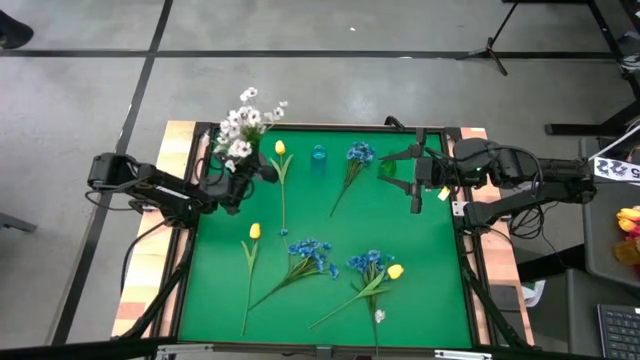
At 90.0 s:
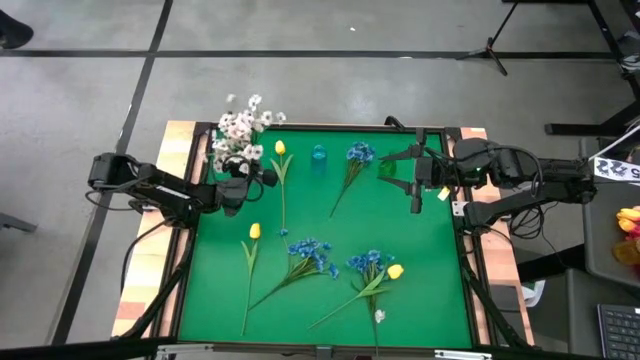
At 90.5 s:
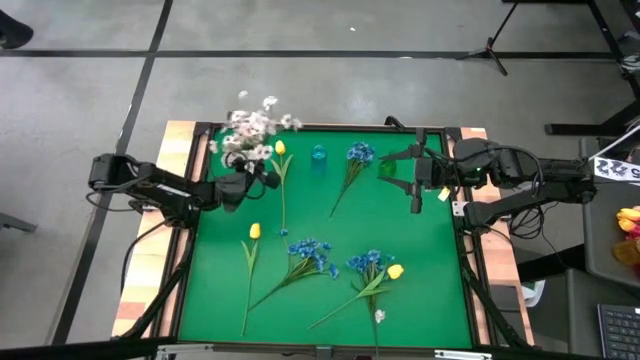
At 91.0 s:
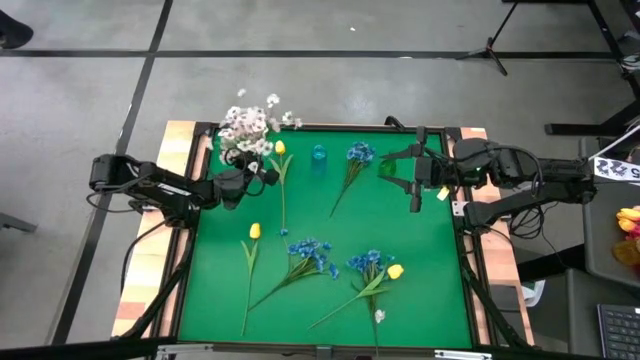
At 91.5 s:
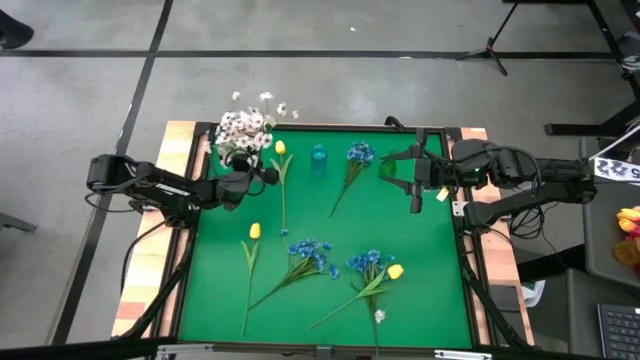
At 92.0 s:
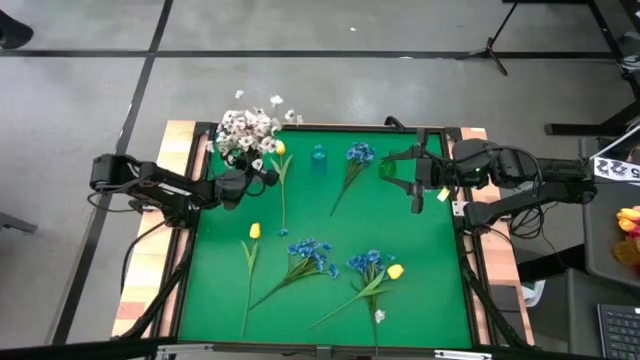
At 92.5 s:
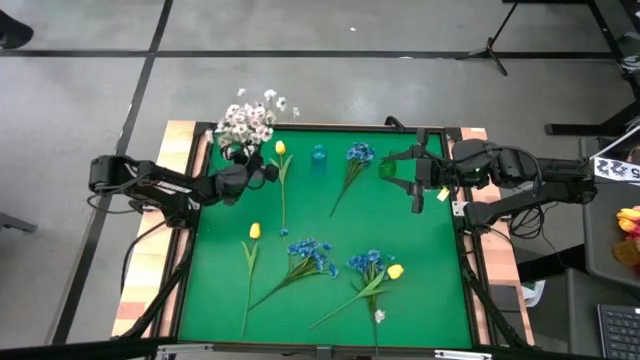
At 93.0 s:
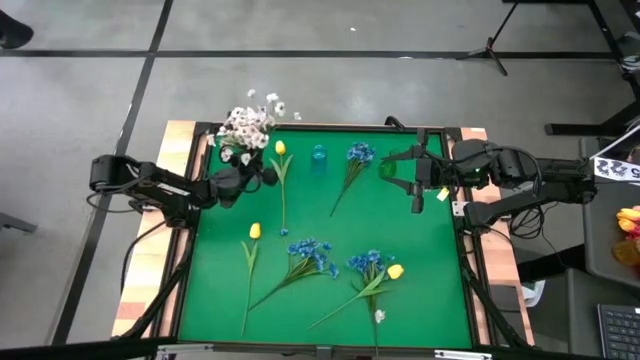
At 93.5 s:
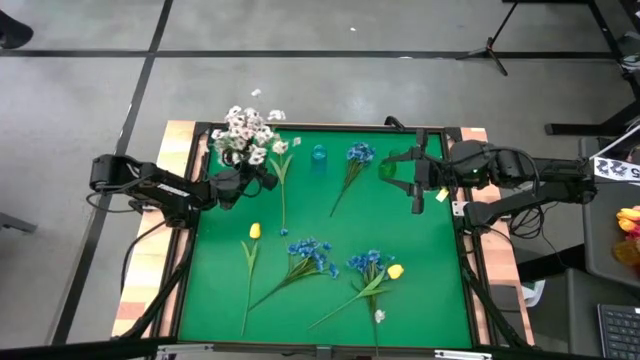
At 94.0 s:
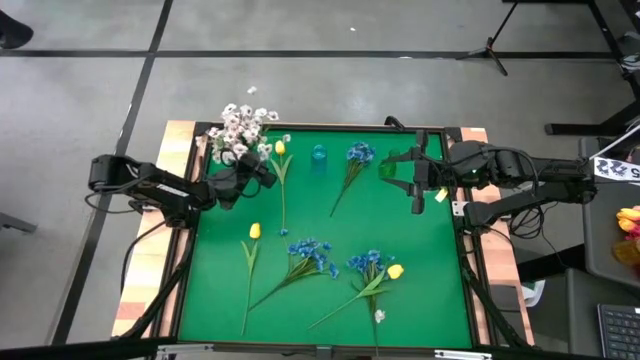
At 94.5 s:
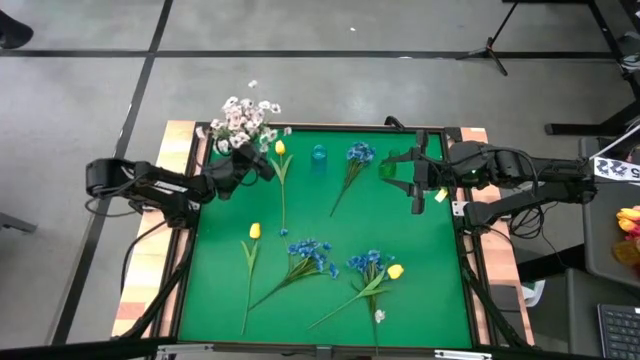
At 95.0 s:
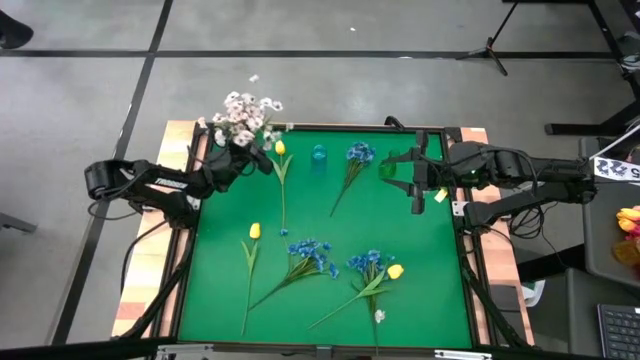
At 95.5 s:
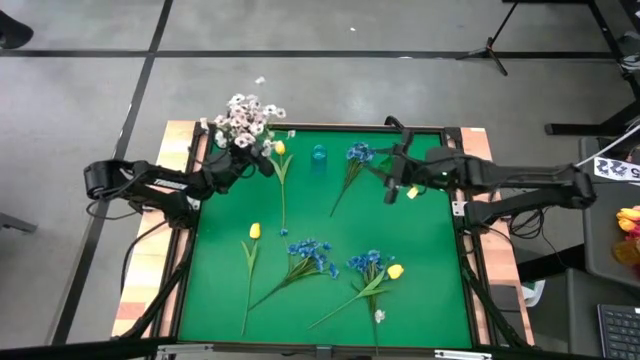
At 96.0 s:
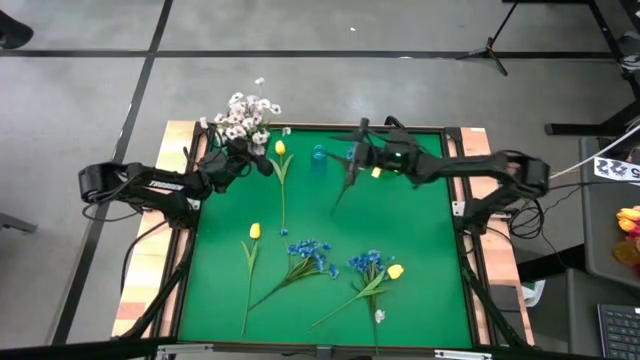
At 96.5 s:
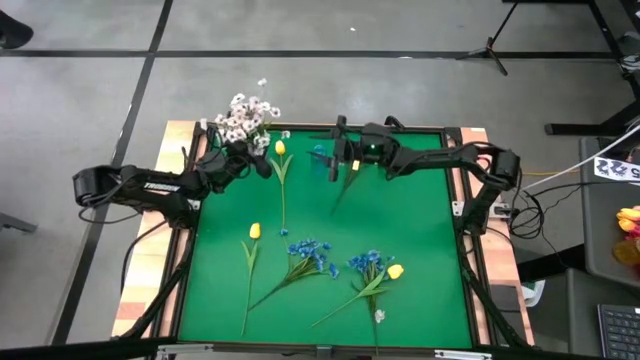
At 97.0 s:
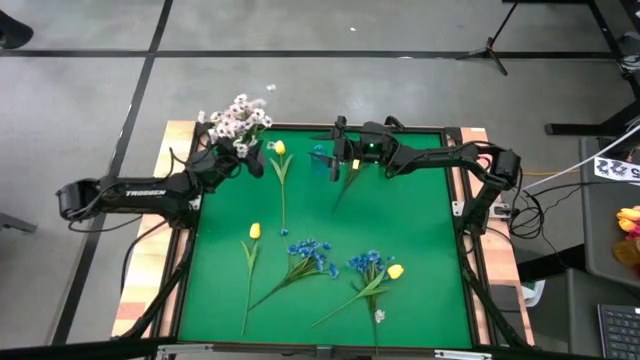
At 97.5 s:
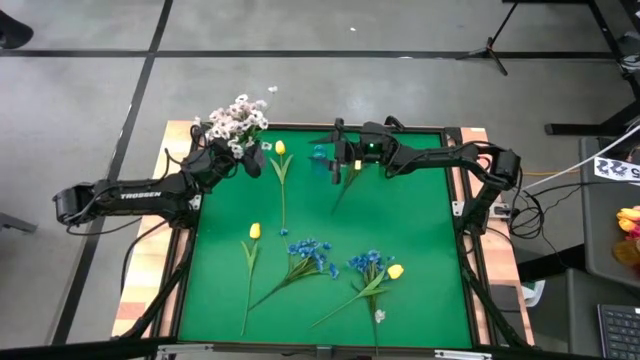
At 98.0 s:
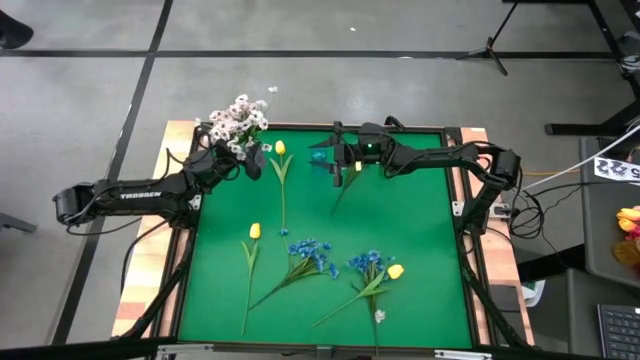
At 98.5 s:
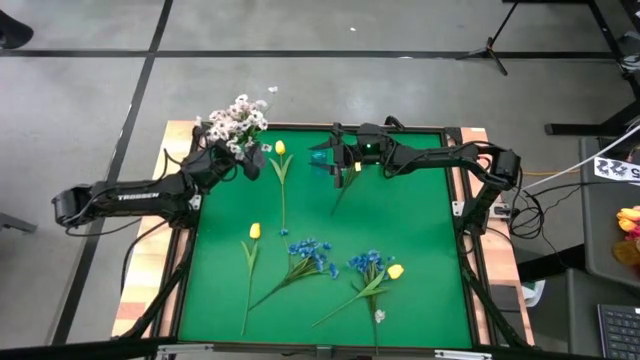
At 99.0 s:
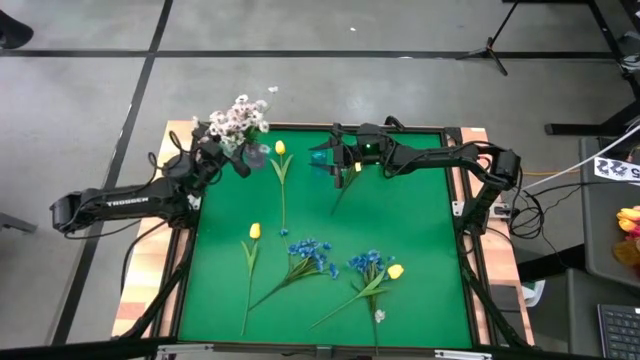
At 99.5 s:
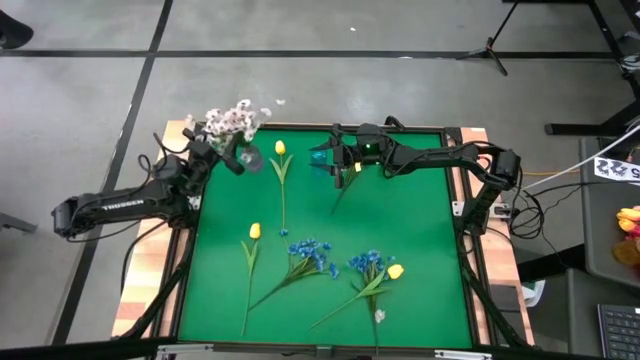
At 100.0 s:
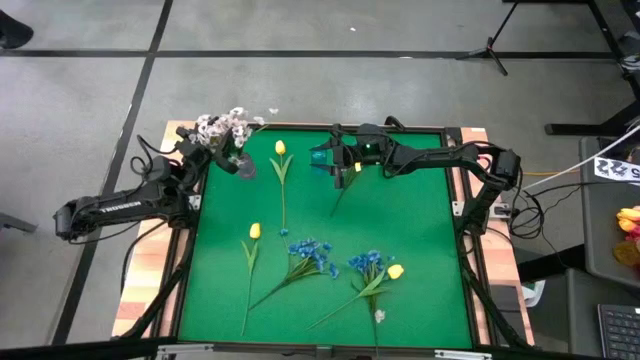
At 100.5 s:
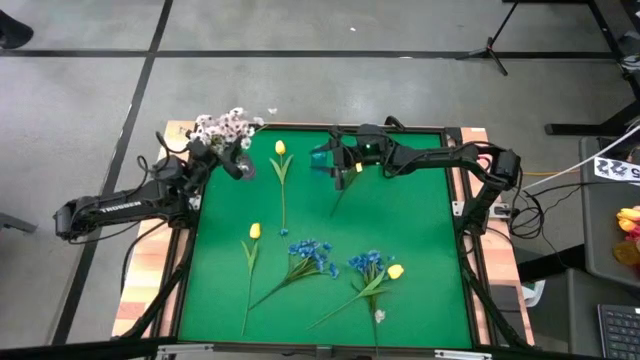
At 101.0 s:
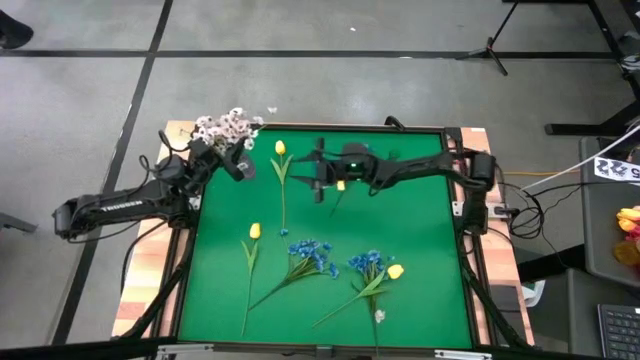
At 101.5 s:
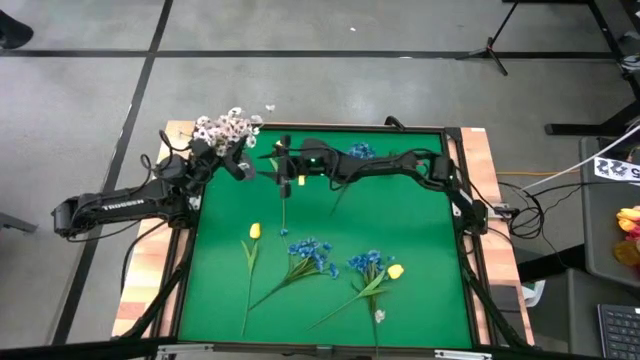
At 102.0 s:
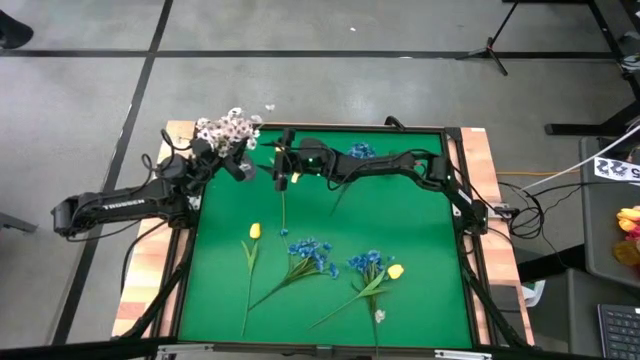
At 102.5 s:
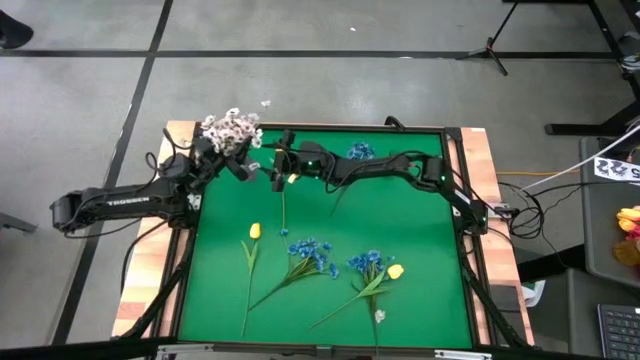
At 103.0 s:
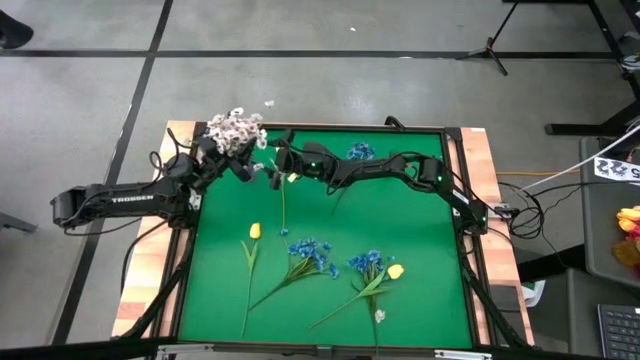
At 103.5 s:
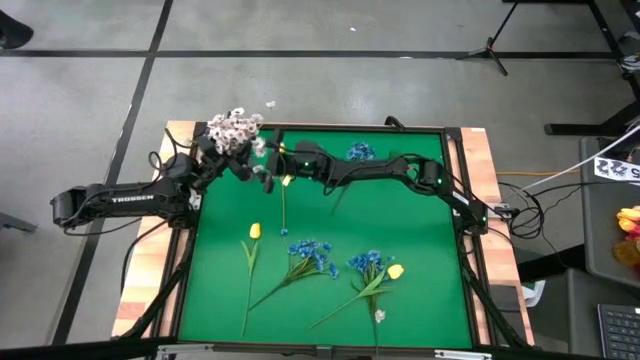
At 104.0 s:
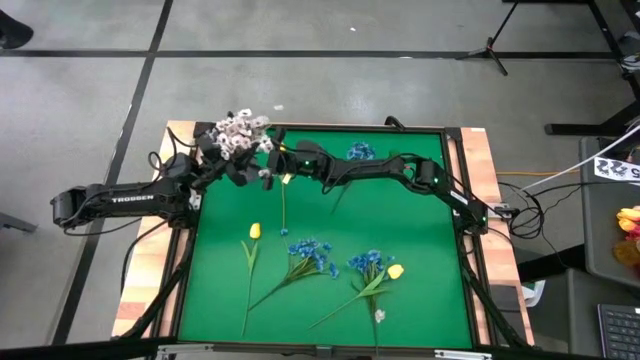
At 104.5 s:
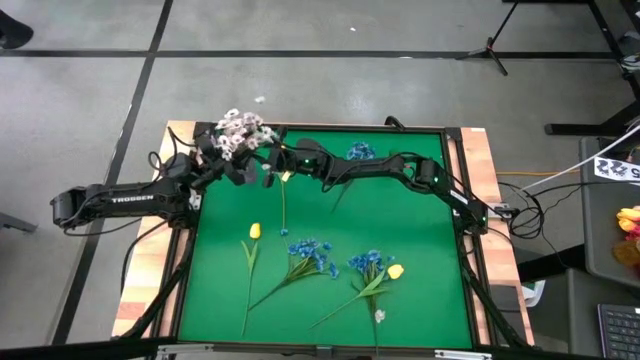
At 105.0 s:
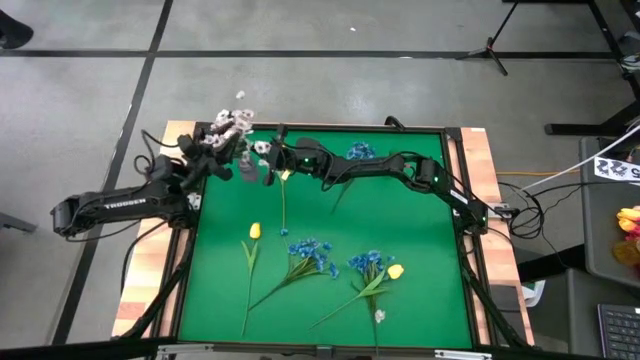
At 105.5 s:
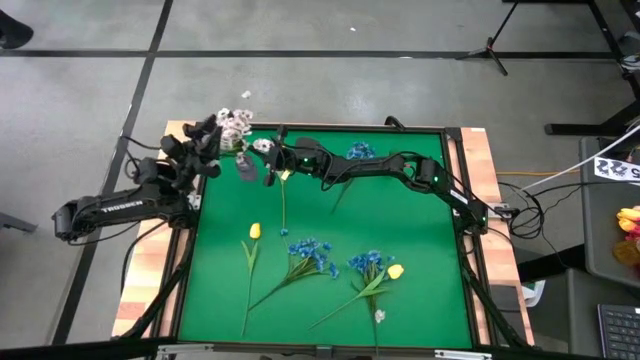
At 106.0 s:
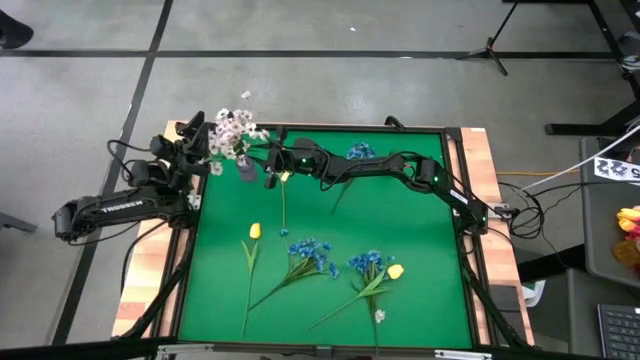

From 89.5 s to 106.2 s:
Task: Sort flowers into vase by color
Put the white flowers into the violet vase

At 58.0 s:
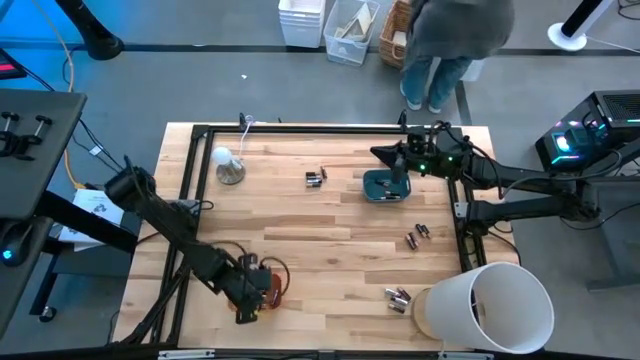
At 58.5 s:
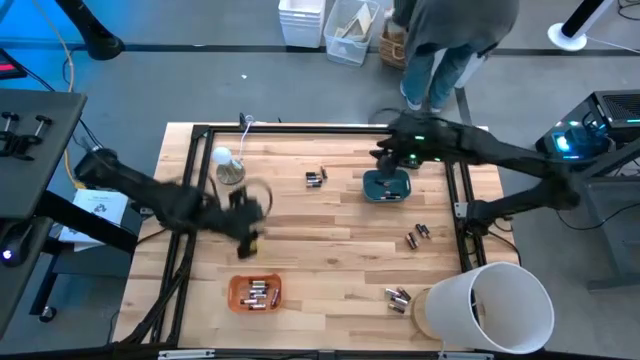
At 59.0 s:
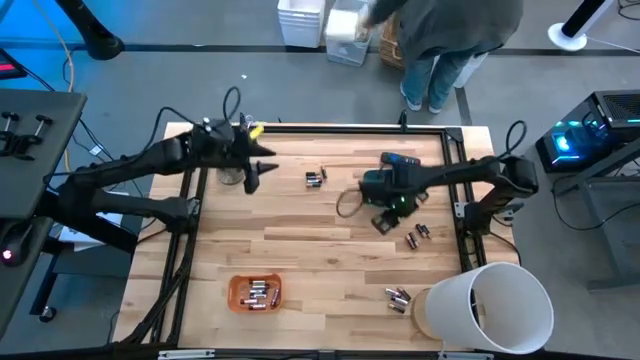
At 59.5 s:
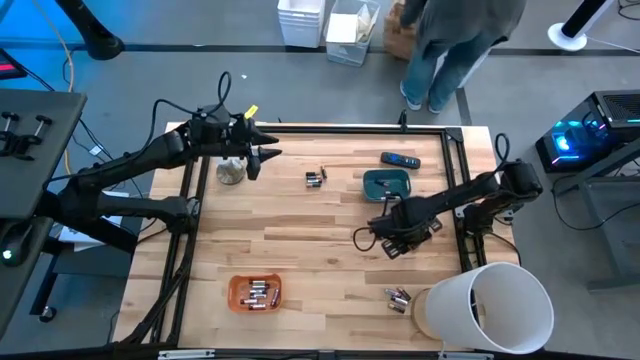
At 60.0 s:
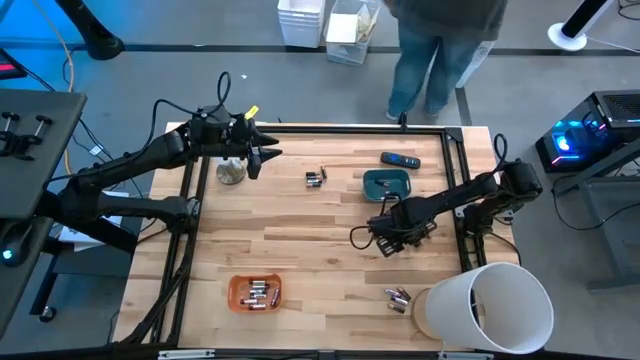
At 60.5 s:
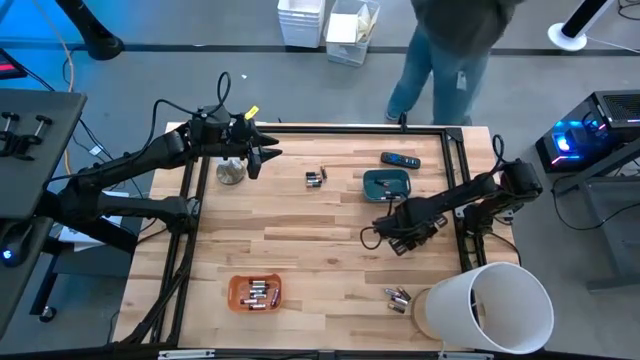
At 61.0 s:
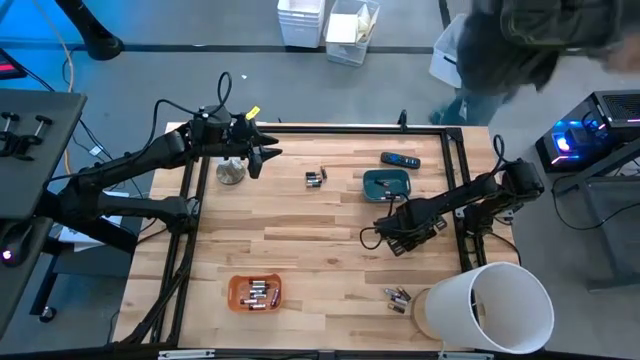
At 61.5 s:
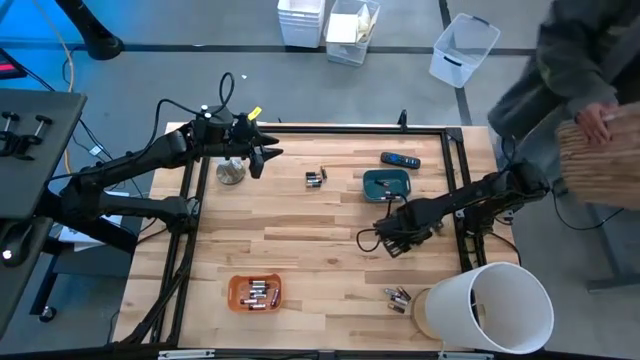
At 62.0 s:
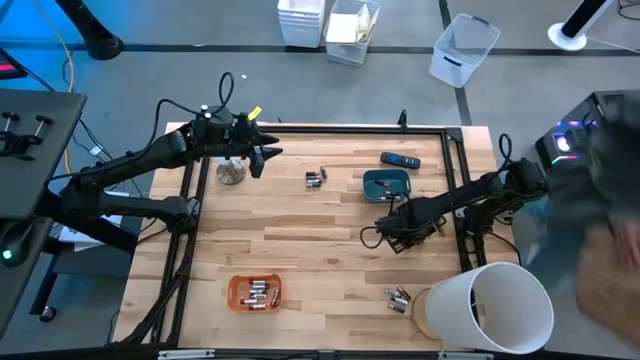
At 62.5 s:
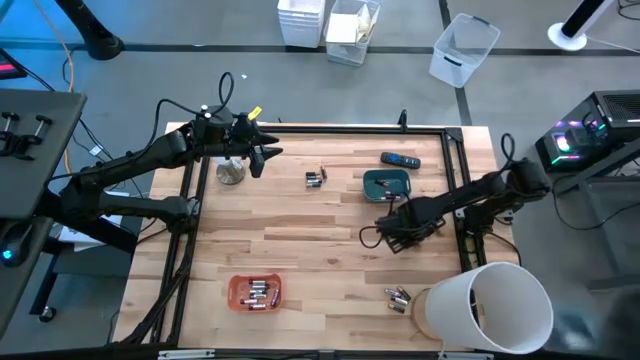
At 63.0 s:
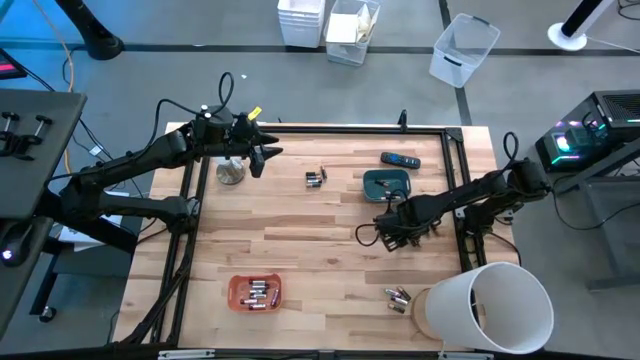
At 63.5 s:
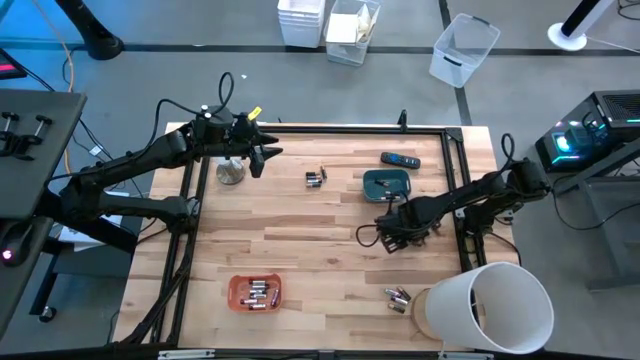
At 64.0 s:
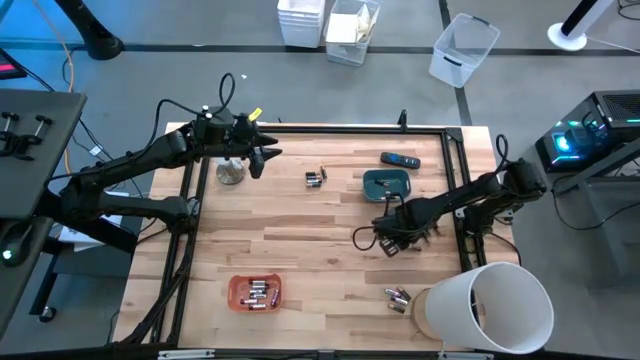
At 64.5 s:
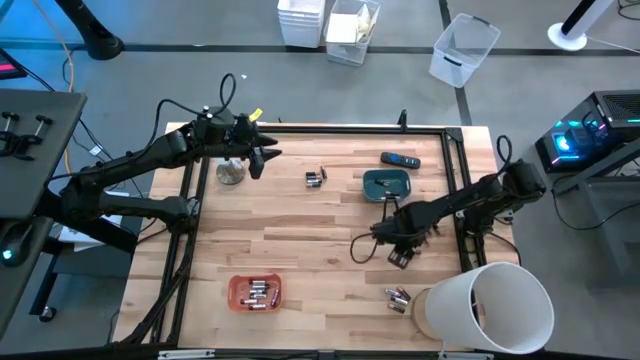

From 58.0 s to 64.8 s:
Task: Sort batteries
Put the black battery into the blue bin
